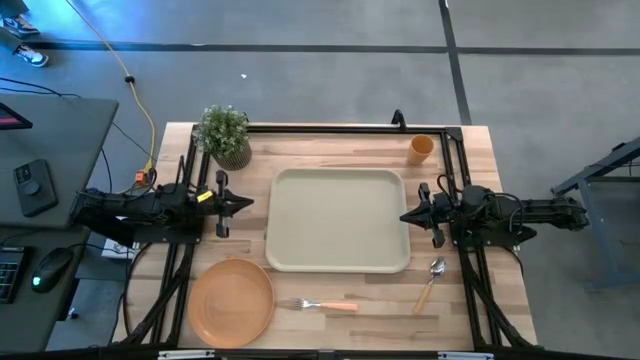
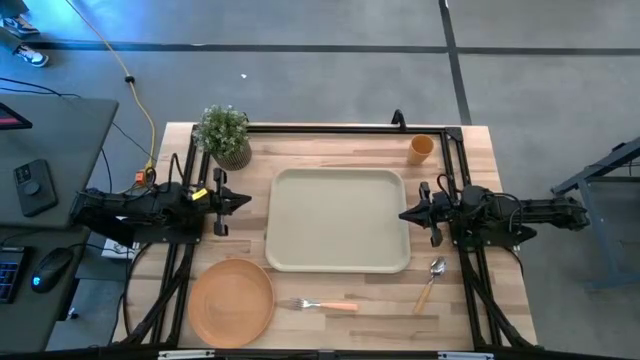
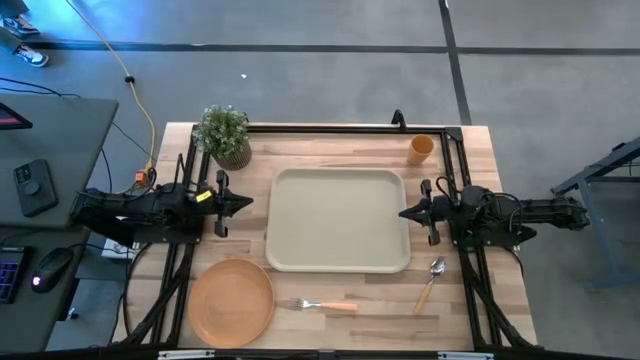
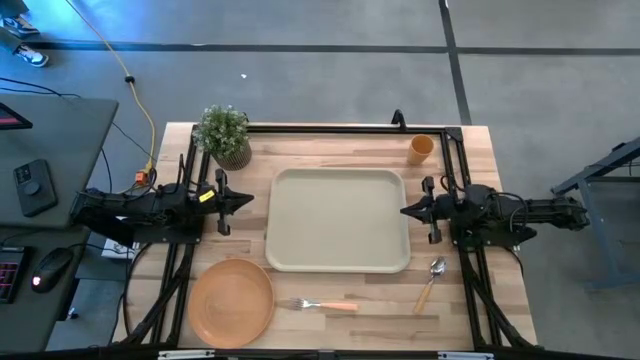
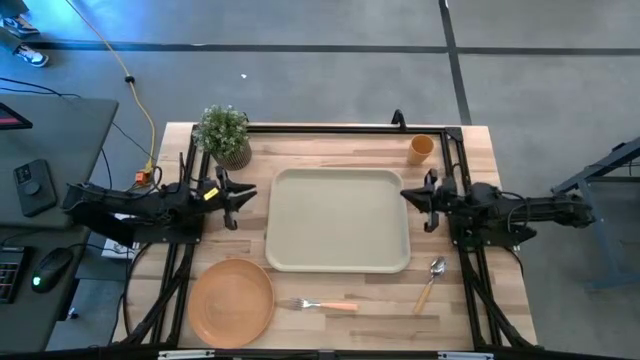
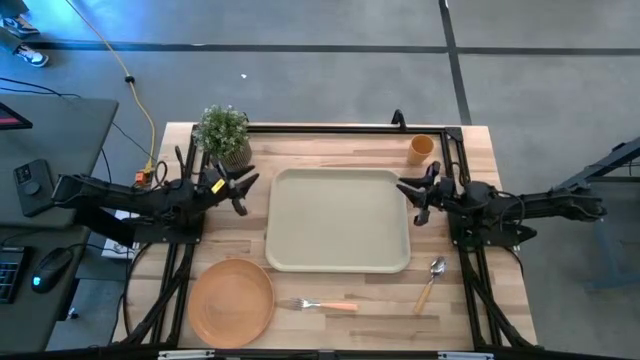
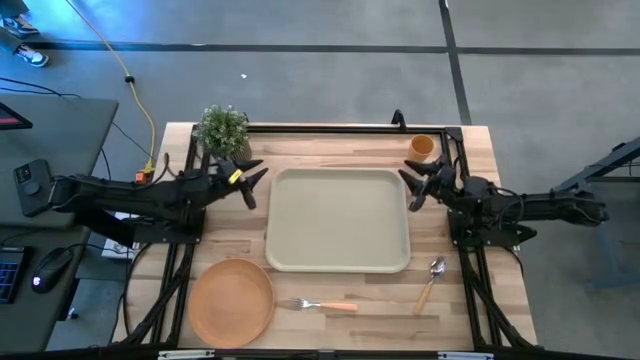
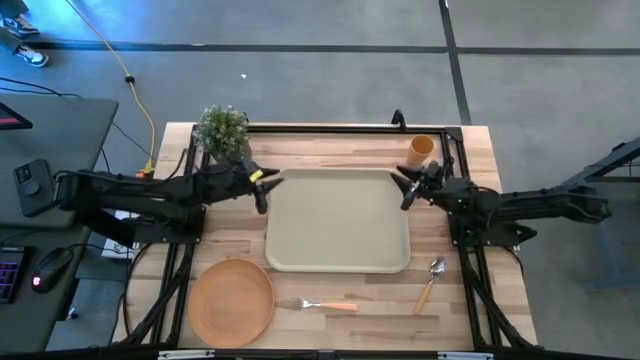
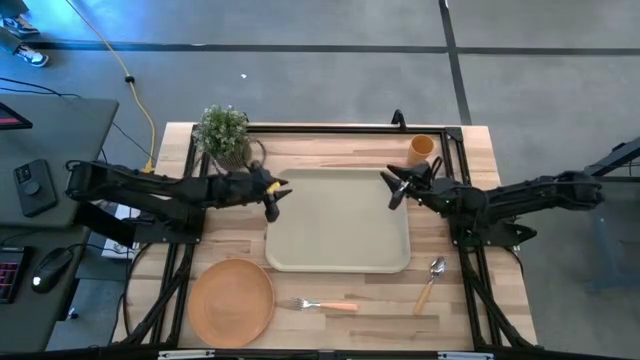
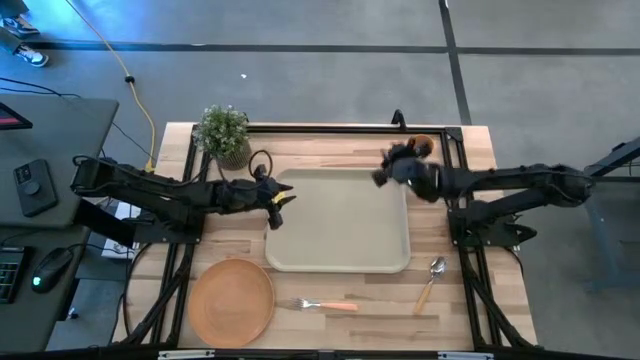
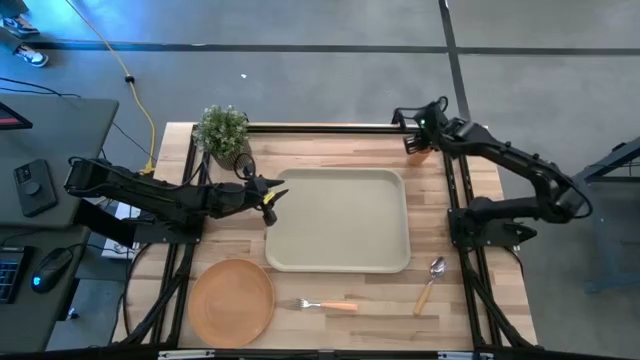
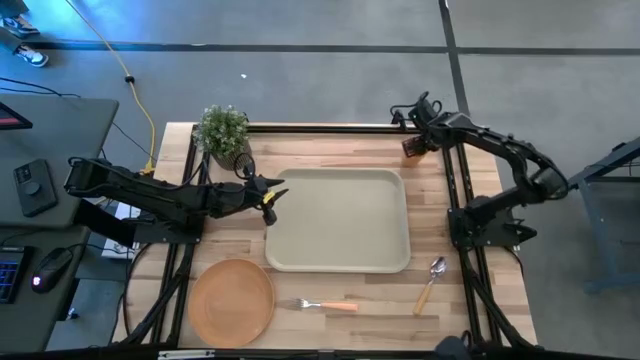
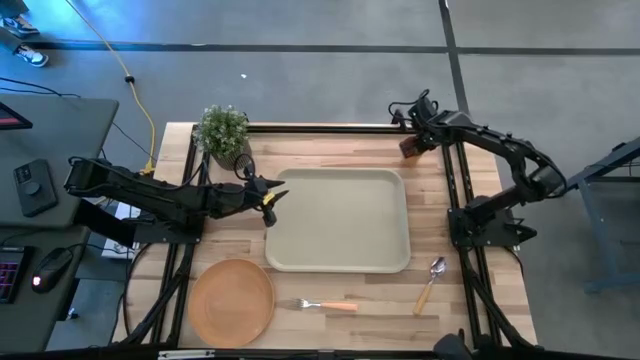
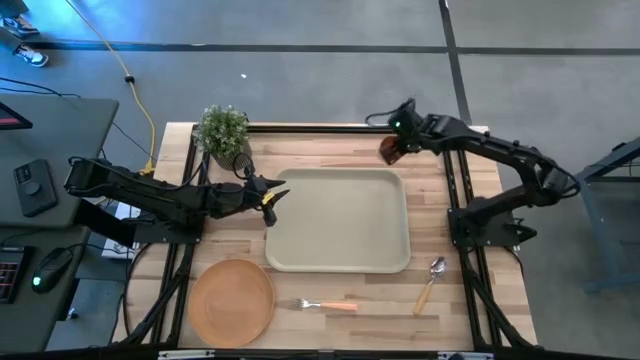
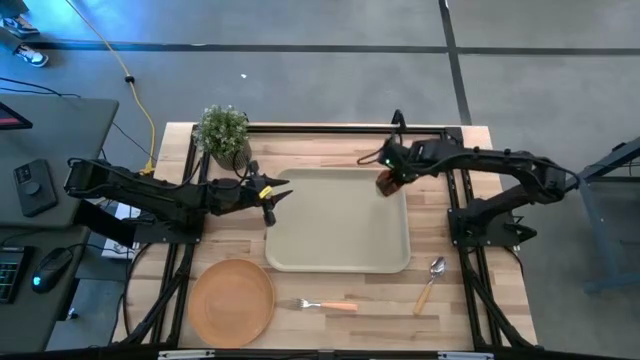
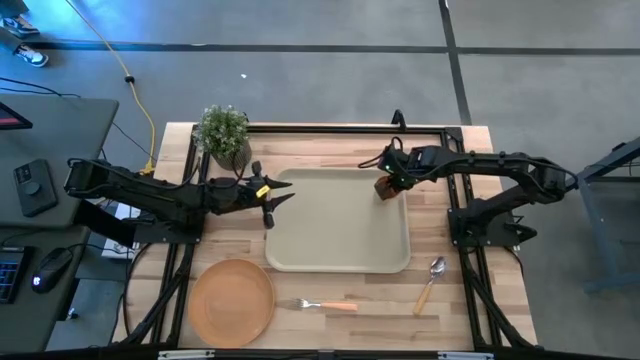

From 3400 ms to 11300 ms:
Task: Pick and place plate/cup/fork/spoon on tray
Put the orange cup on the tray

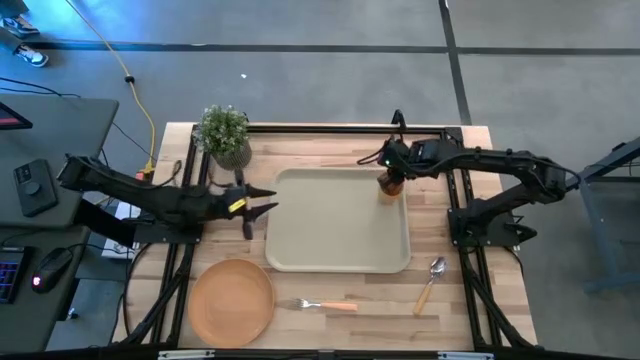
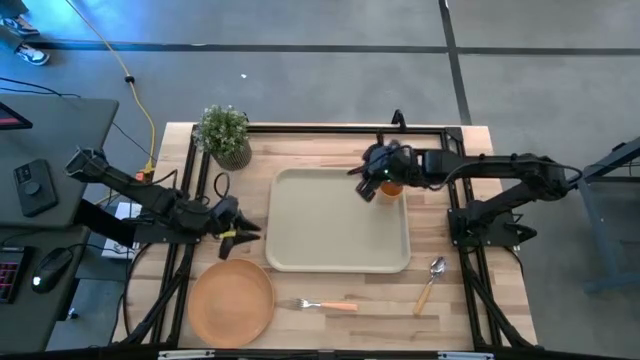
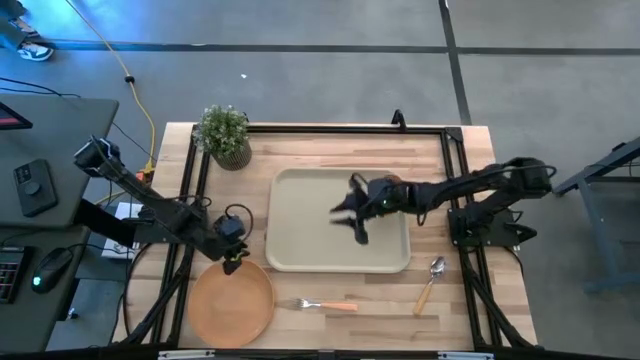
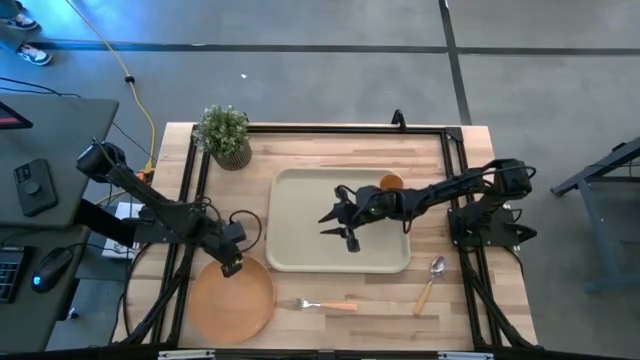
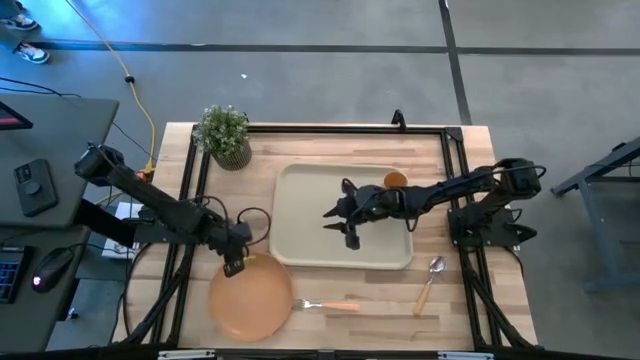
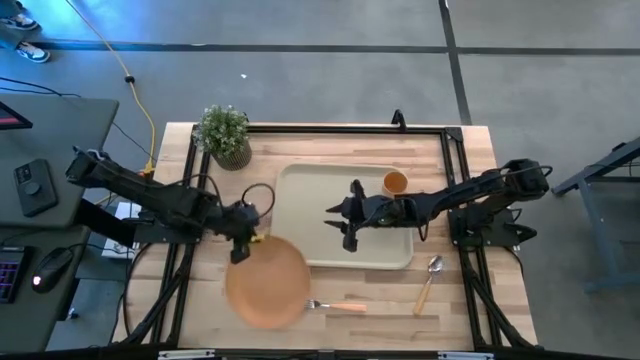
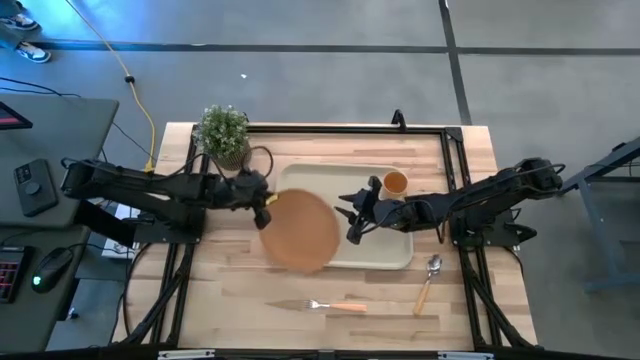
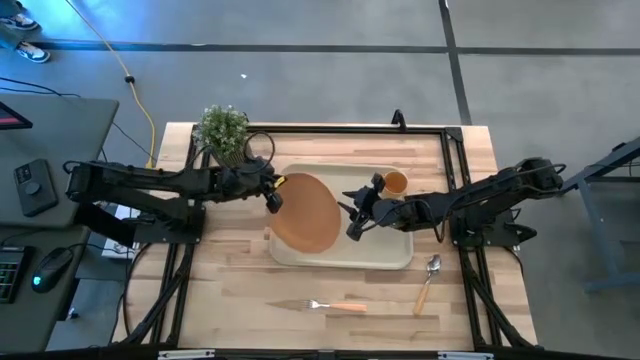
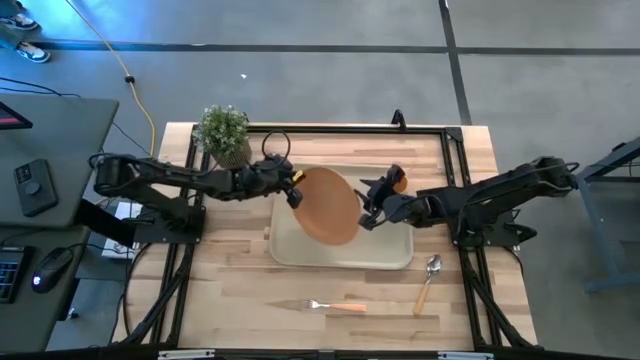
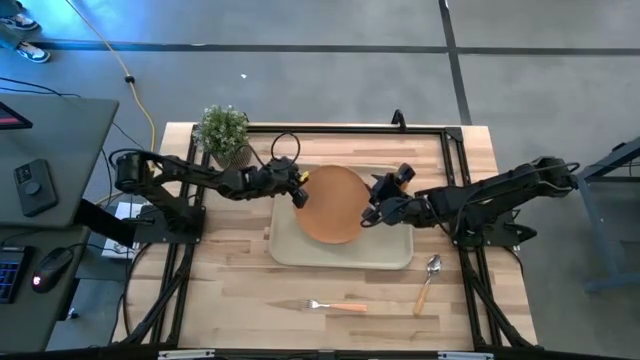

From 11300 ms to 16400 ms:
Put the orange plate on the tray

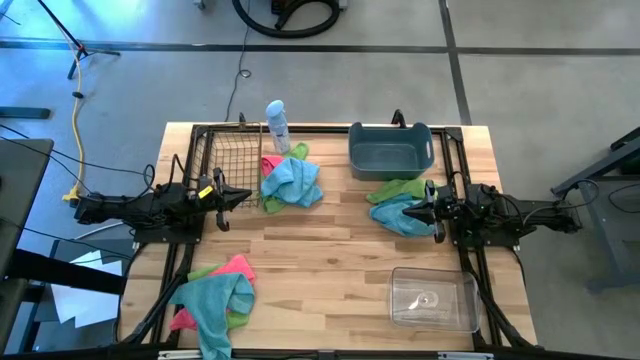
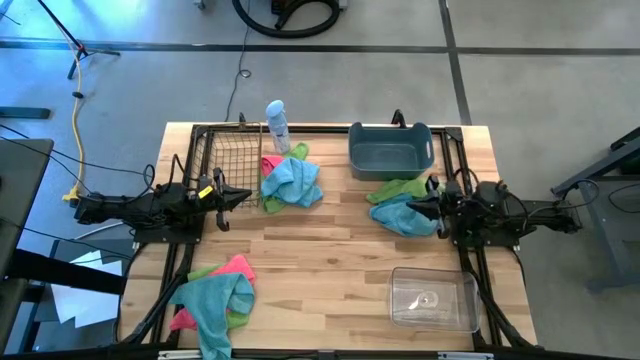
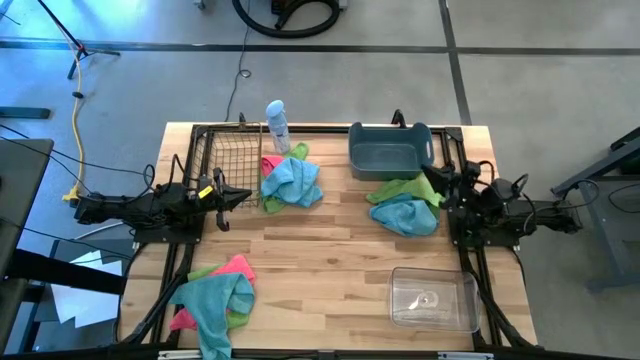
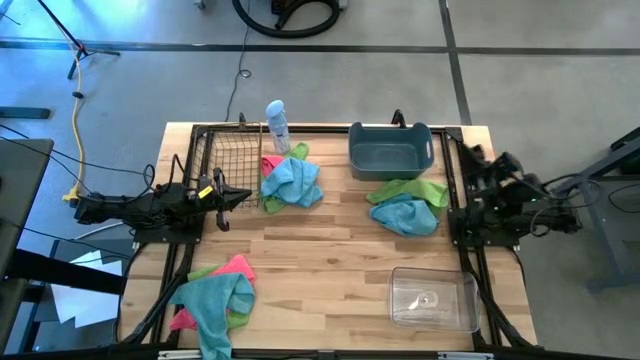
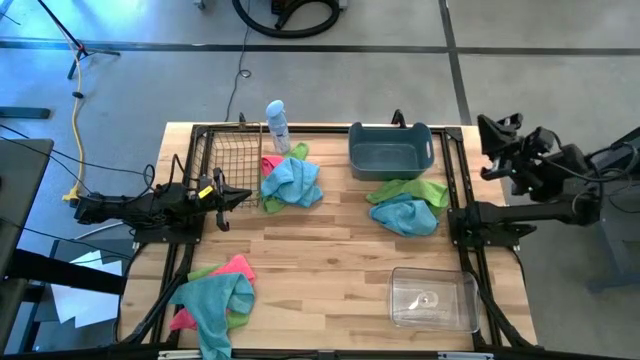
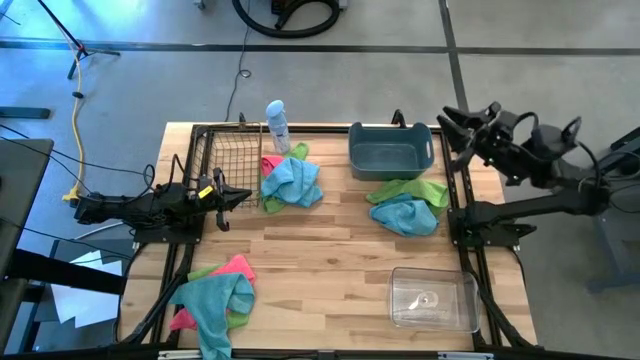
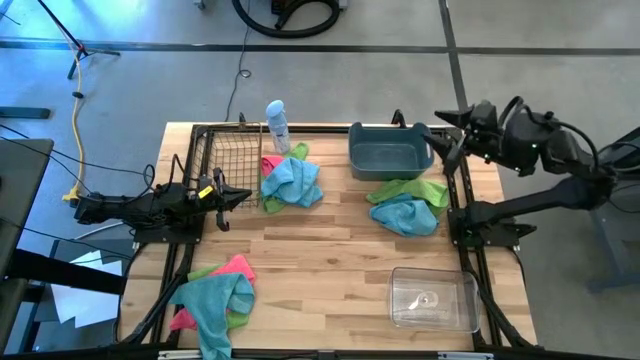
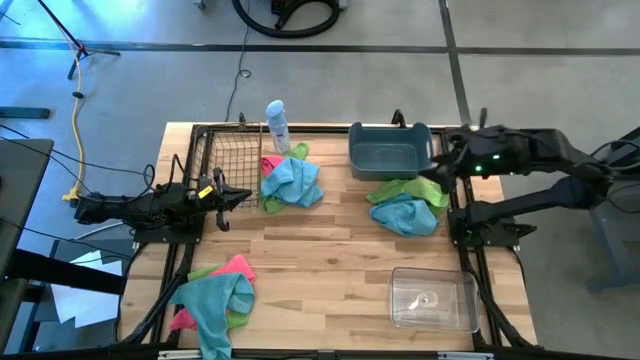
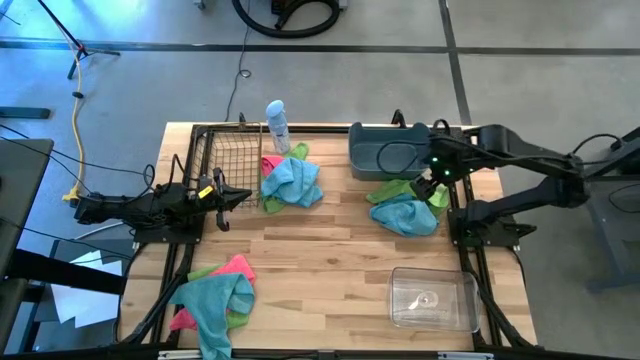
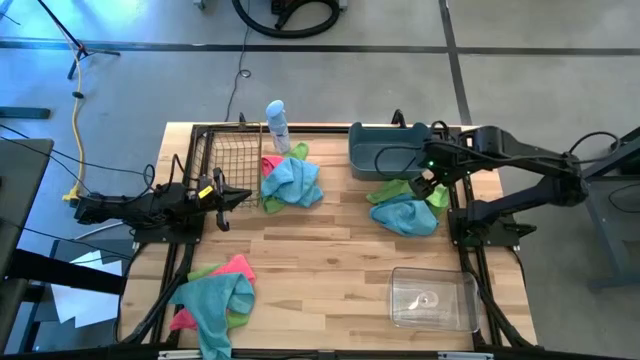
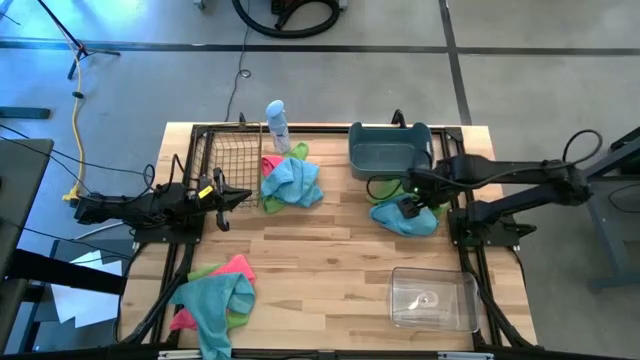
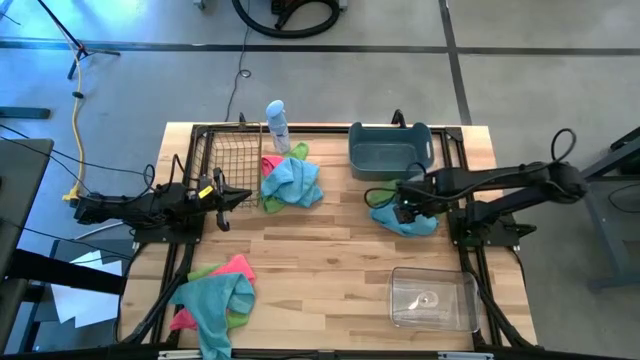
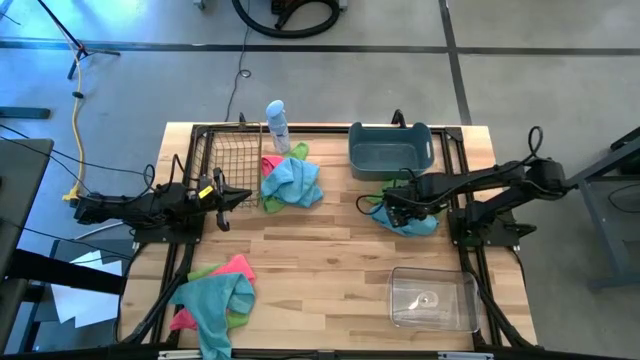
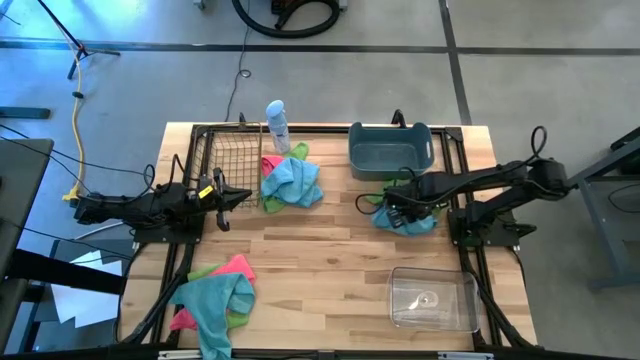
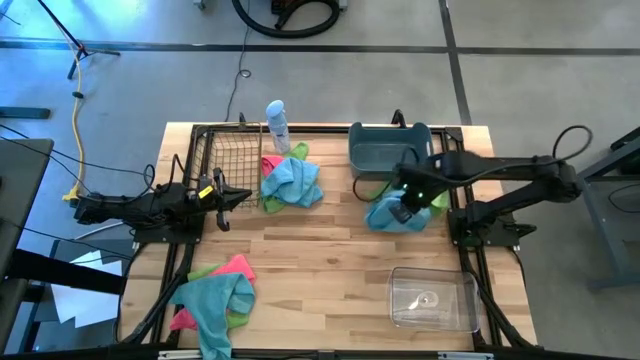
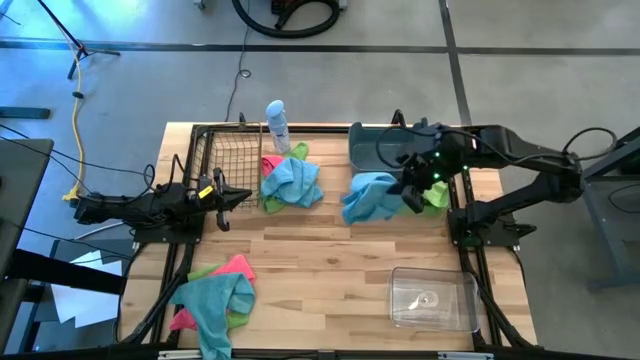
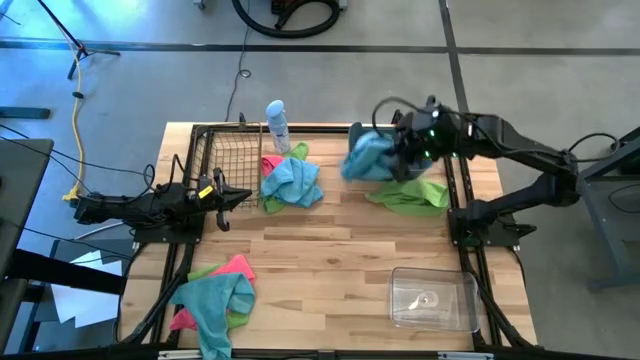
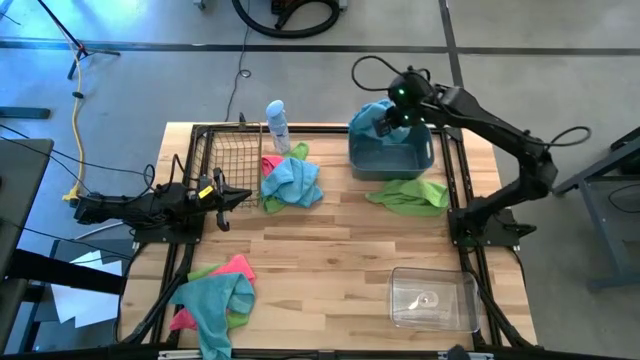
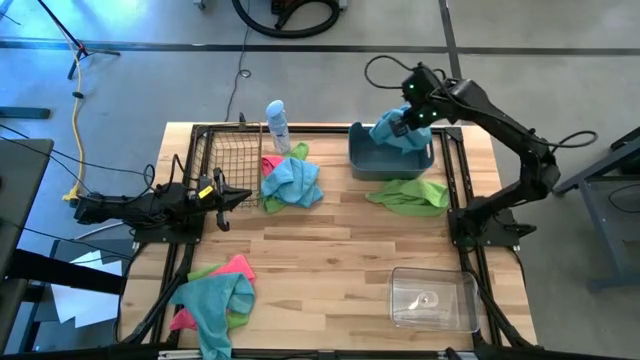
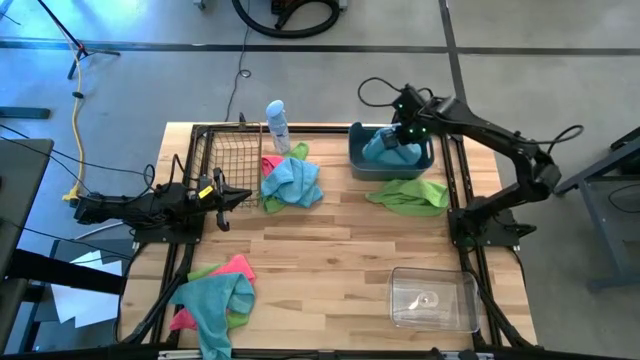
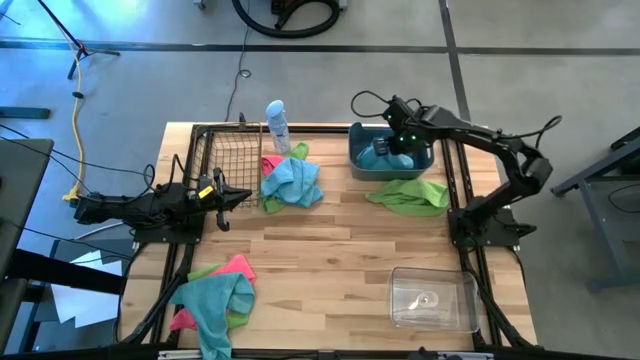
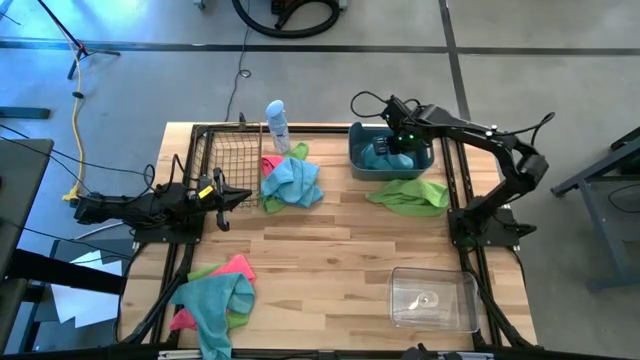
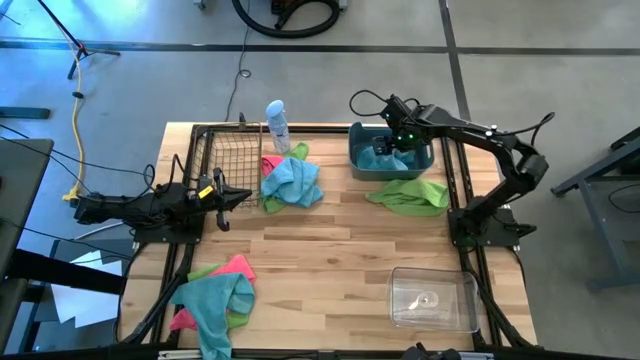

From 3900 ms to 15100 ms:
Task: Sort microfiber towel by color & place in baskets
Put the top right blue towel into the blue bin
